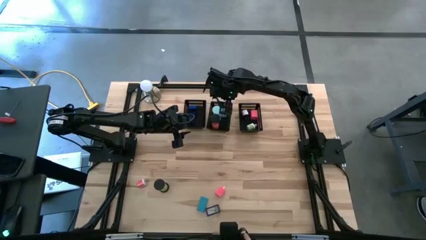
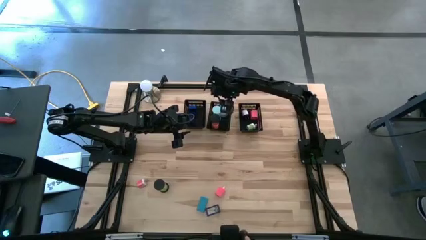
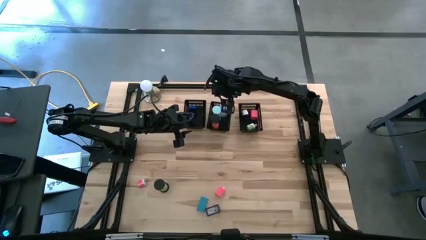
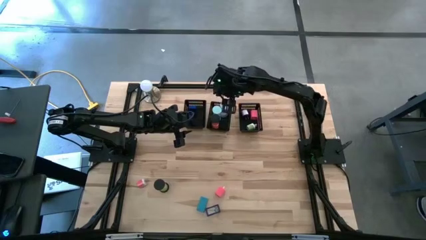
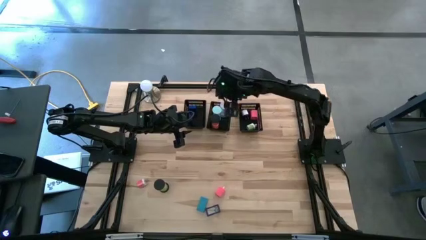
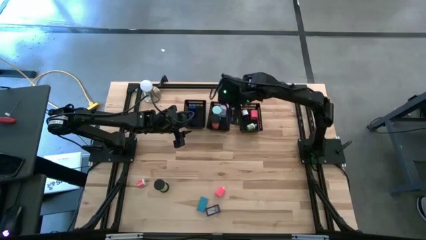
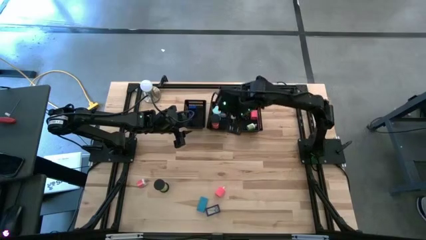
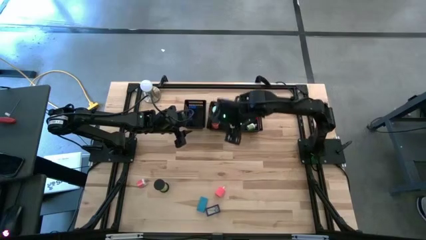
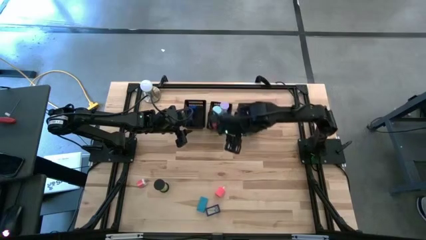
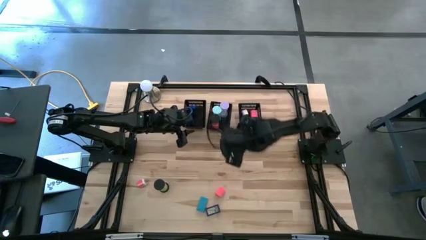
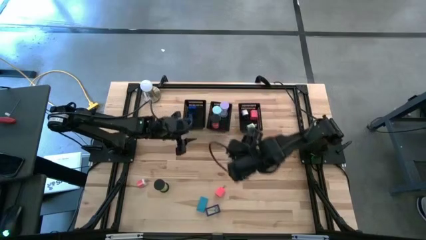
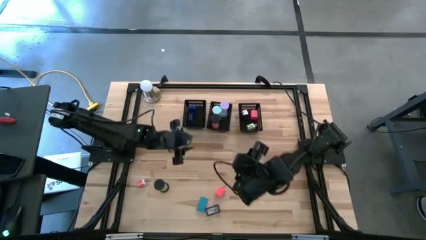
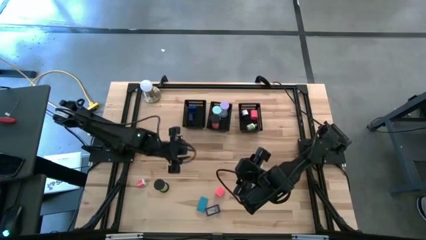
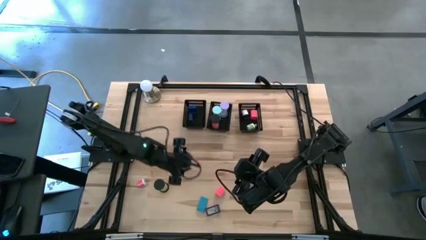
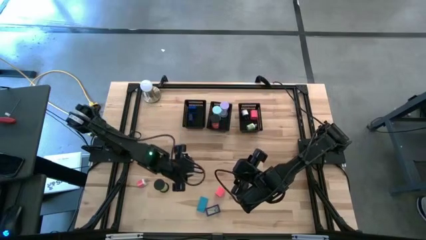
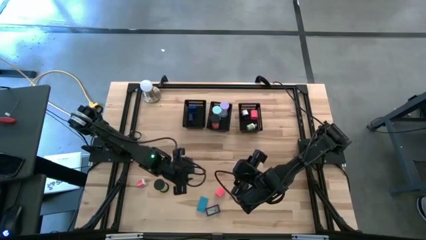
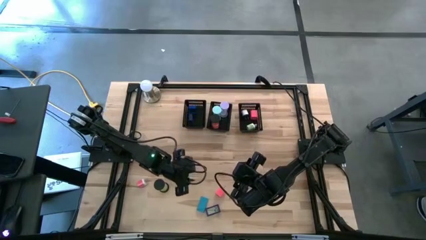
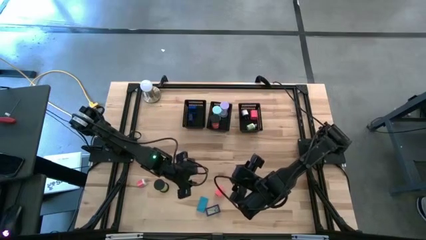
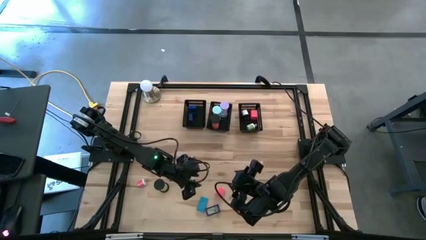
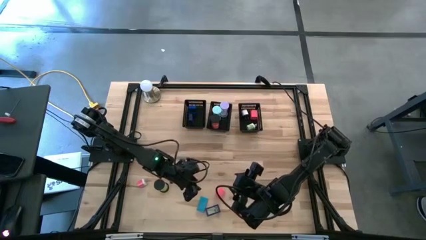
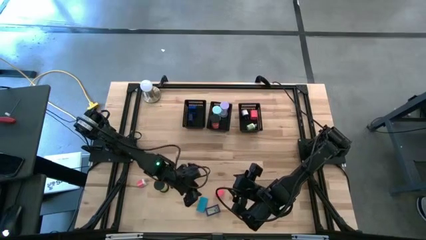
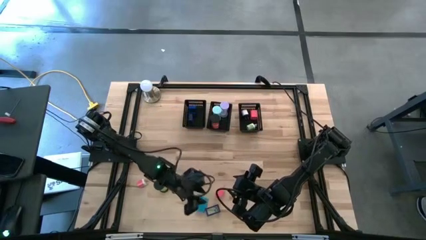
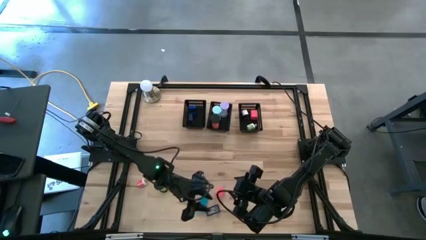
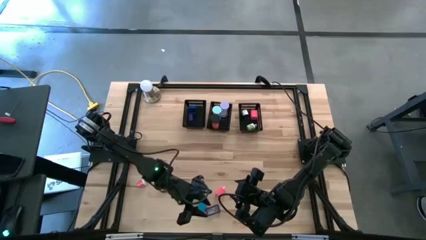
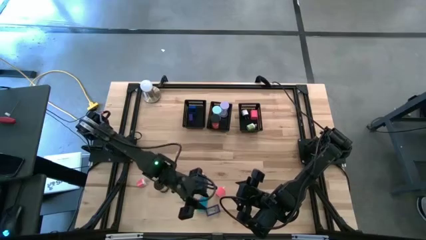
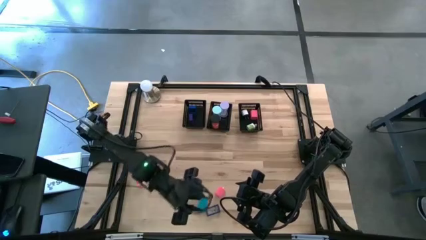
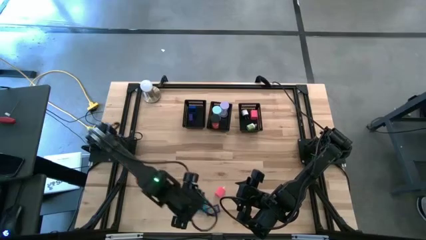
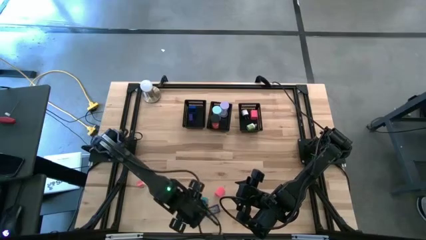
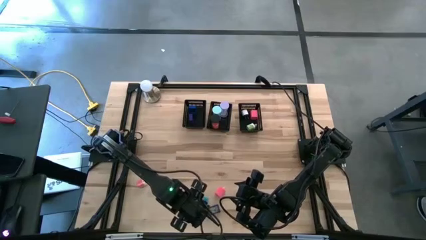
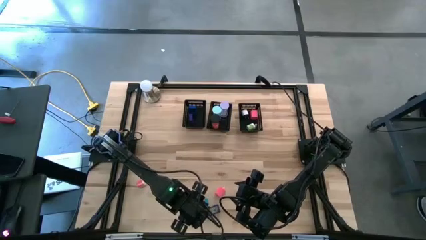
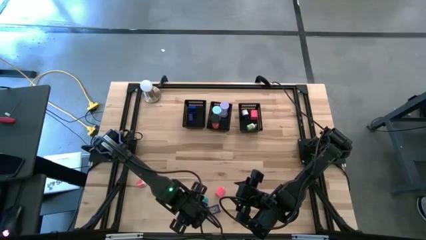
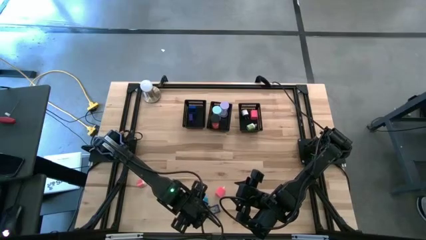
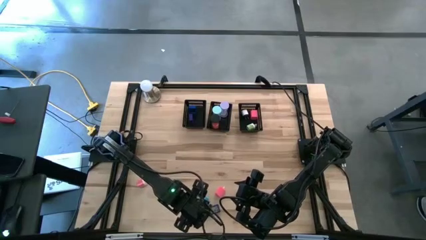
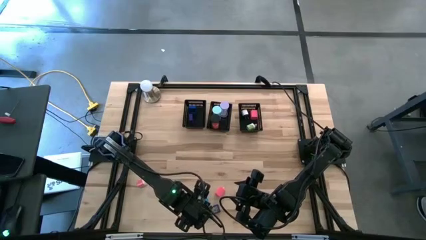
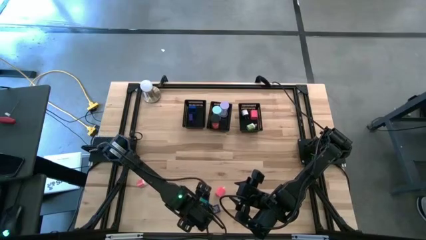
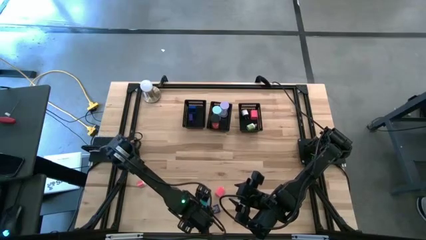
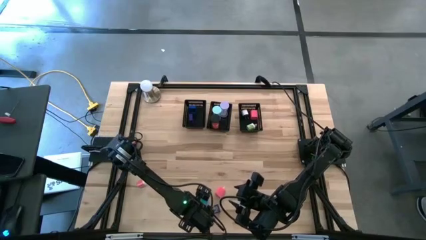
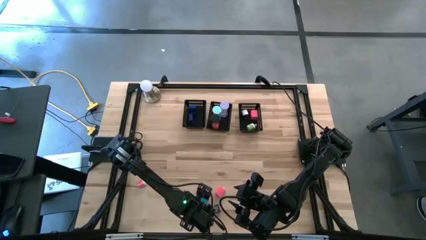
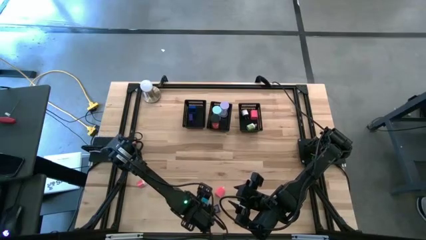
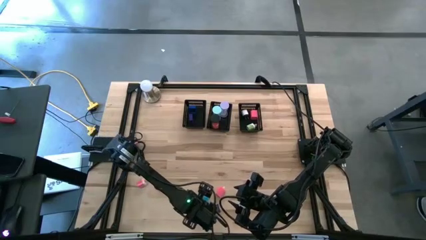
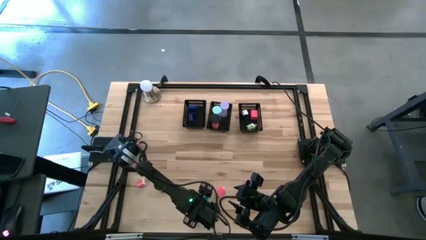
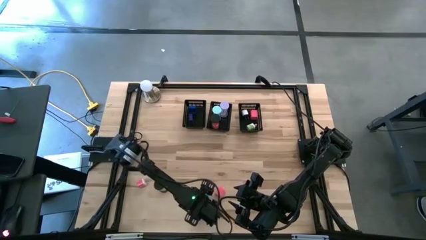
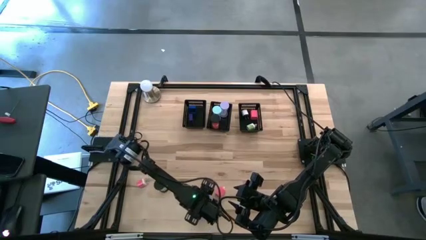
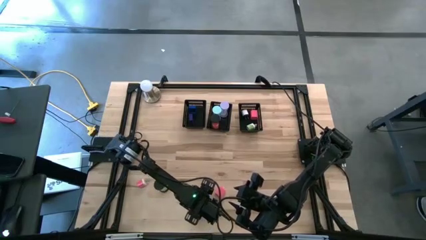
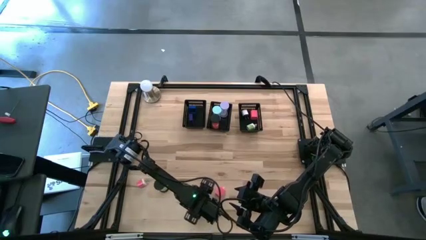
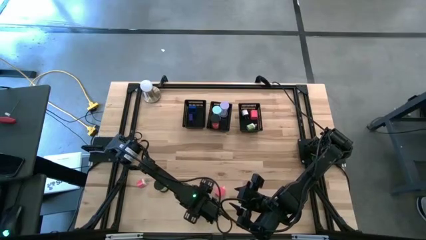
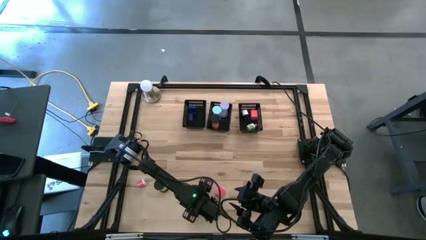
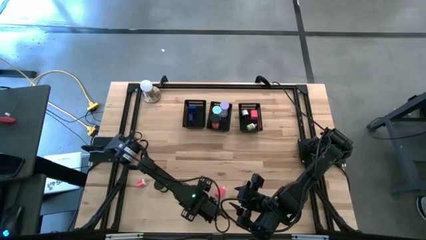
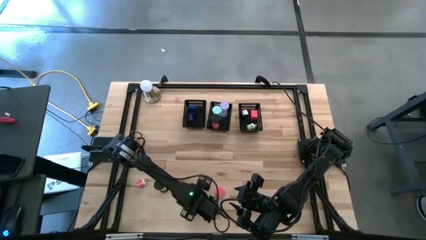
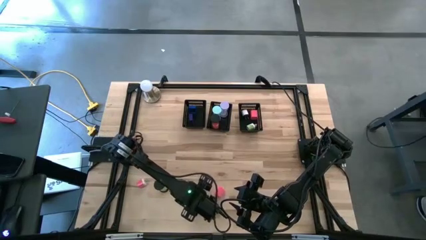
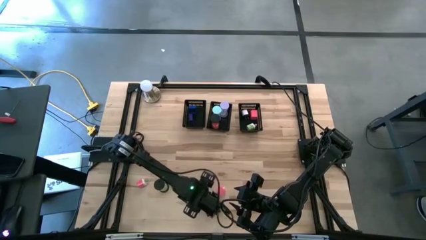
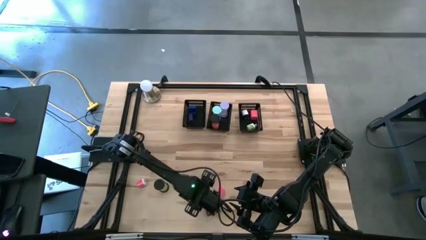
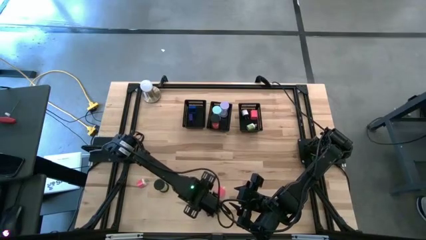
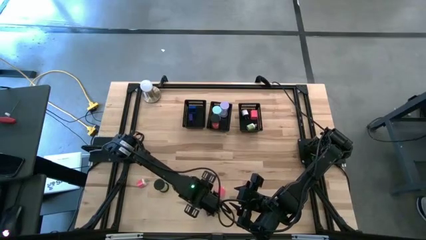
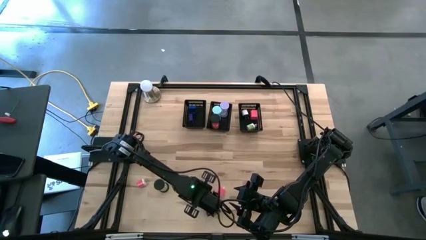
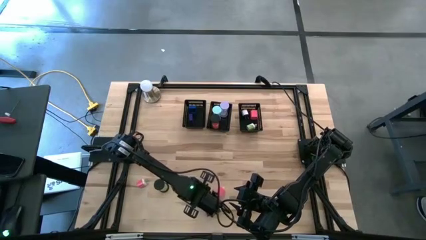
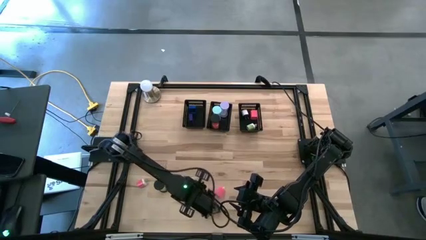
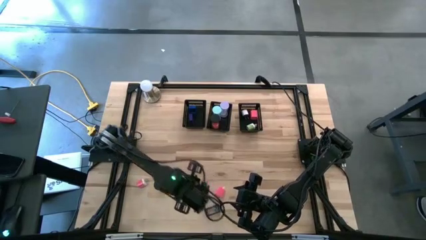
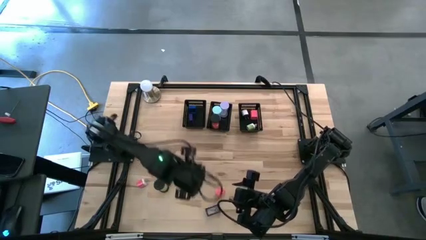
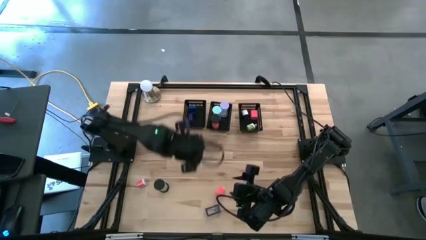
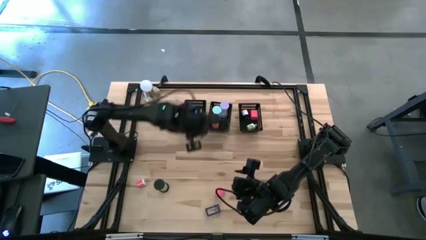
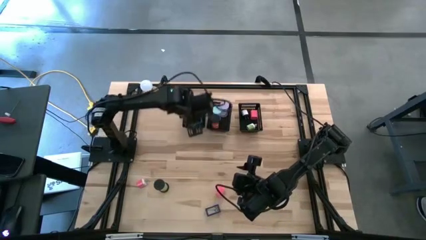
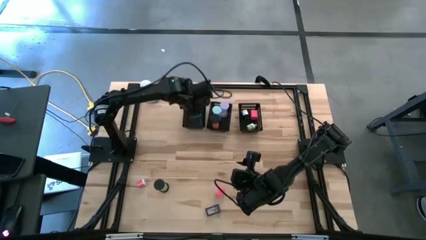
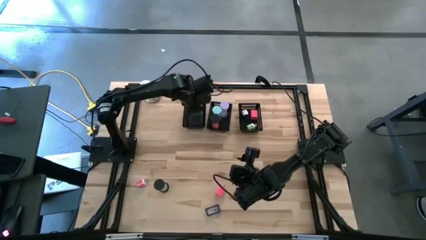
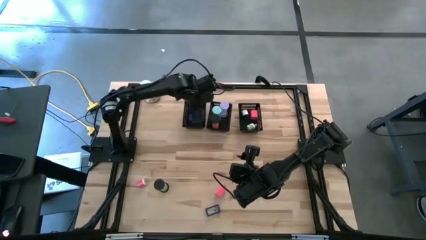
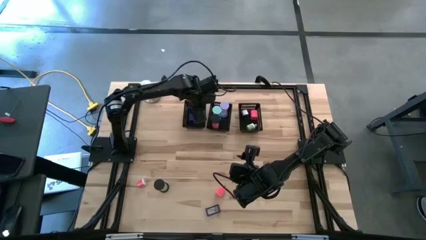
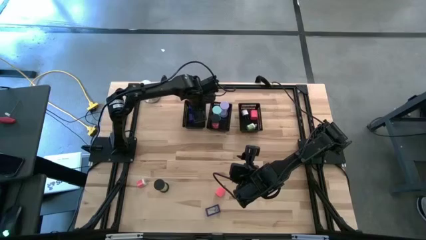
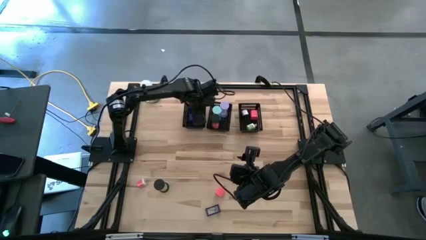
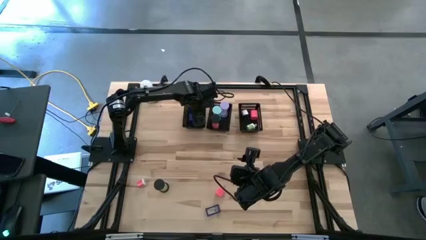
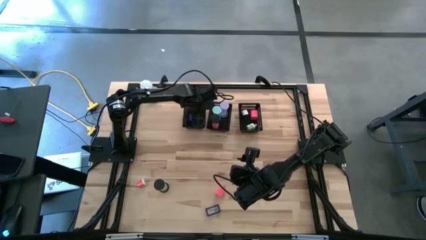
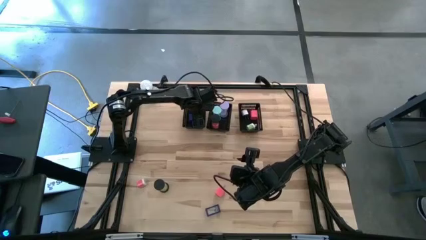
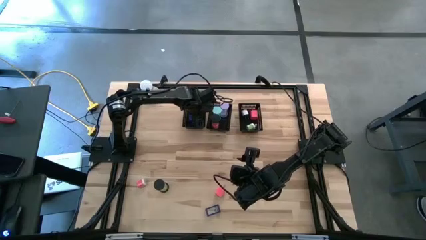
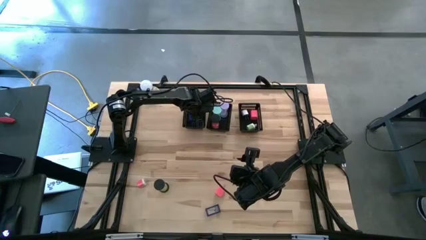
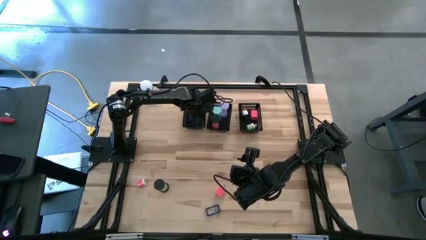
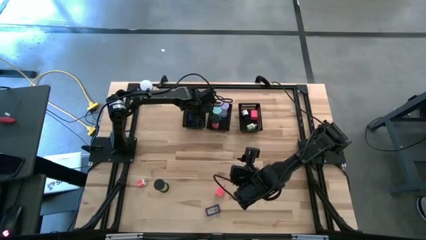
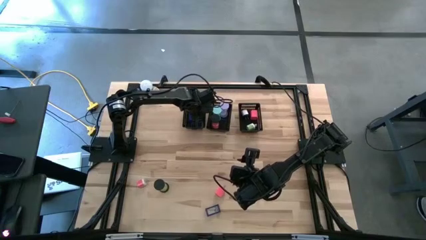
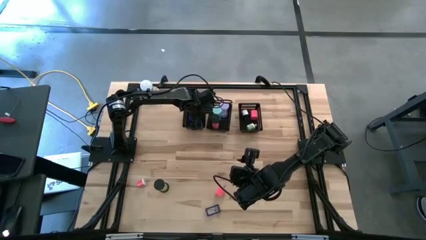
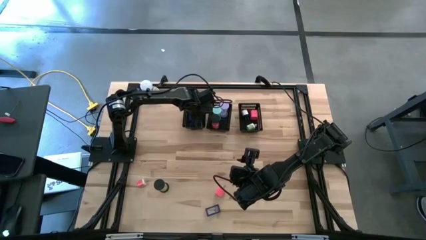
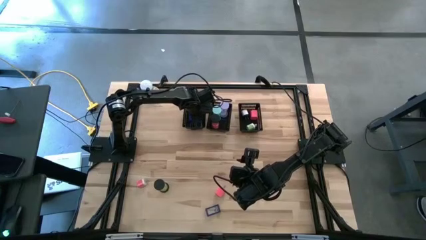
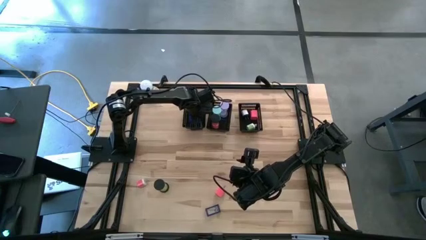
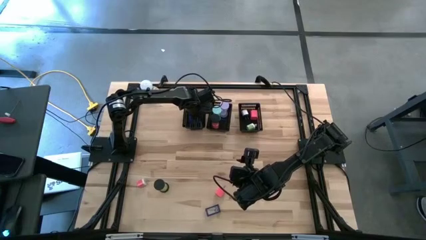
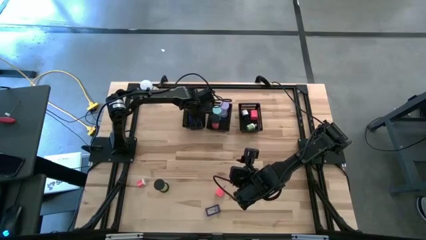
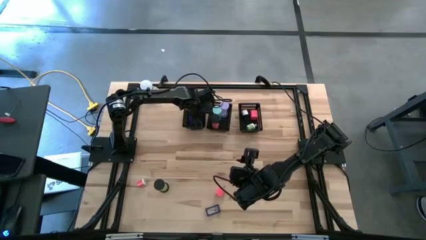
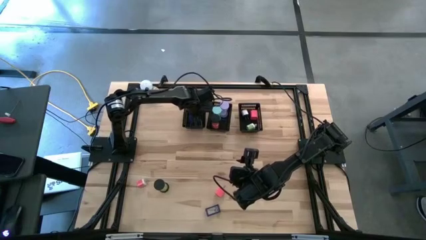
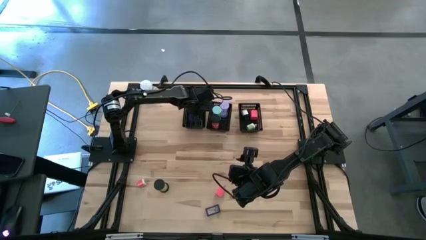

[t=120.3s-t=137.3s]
Task: Pick & Place Office items
Put the light blue digital clock into the left black bin
